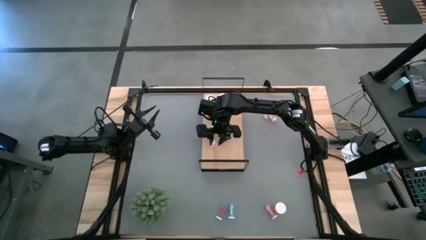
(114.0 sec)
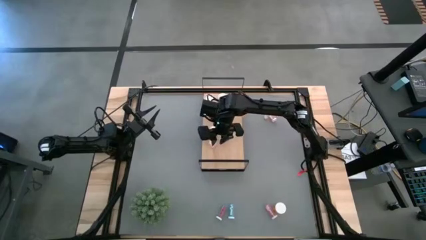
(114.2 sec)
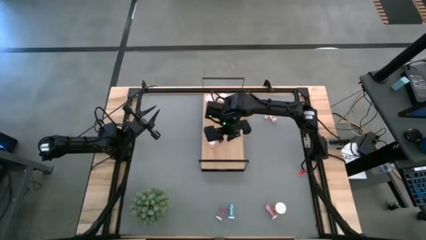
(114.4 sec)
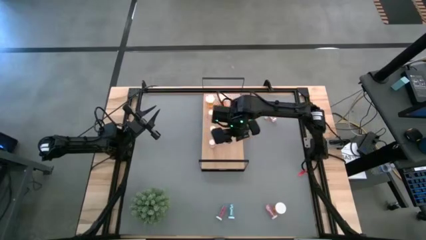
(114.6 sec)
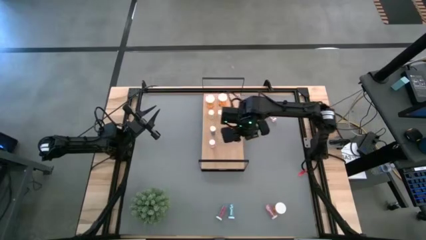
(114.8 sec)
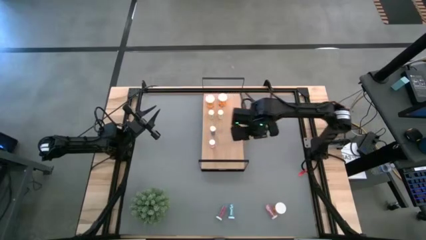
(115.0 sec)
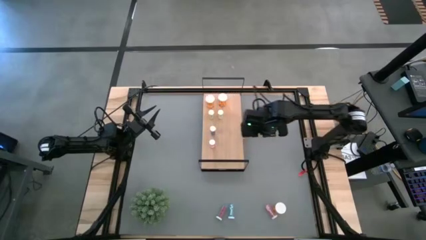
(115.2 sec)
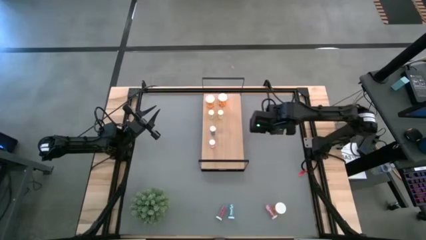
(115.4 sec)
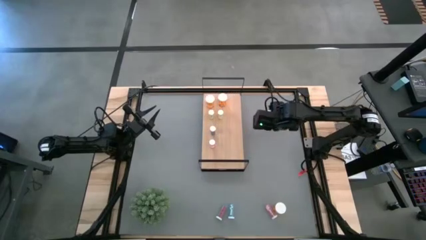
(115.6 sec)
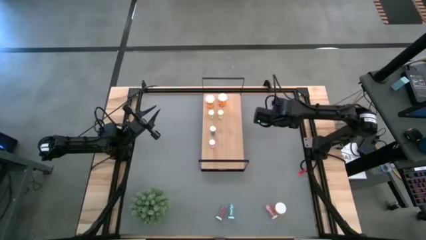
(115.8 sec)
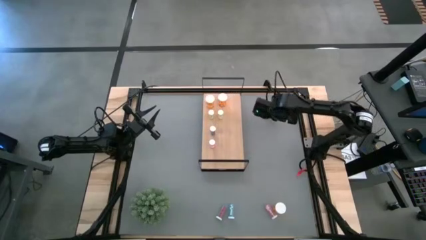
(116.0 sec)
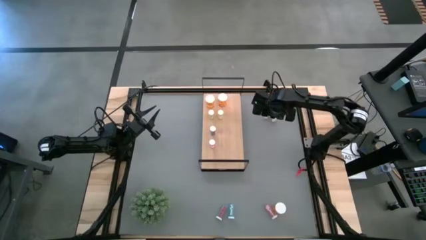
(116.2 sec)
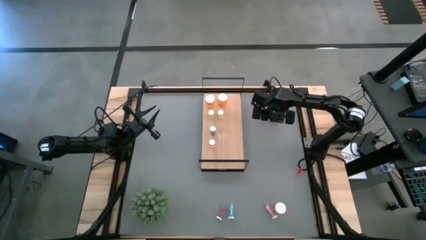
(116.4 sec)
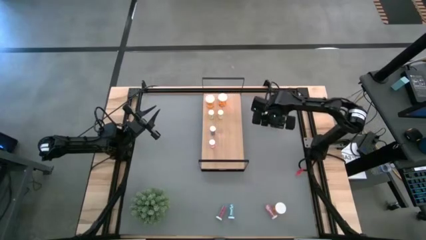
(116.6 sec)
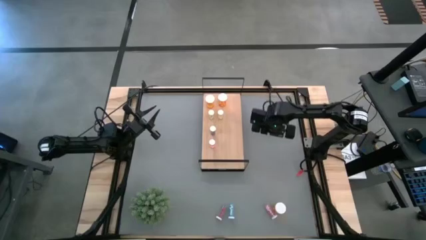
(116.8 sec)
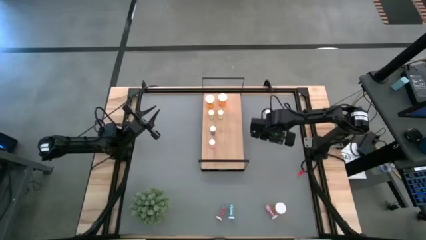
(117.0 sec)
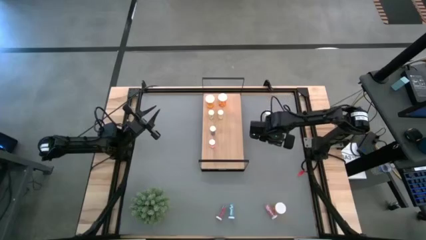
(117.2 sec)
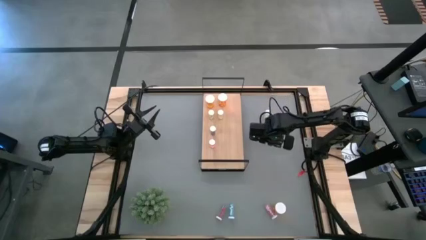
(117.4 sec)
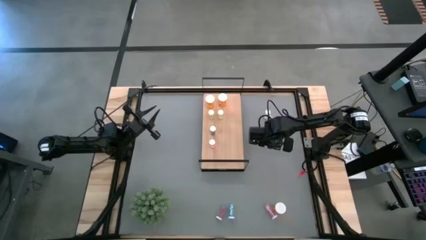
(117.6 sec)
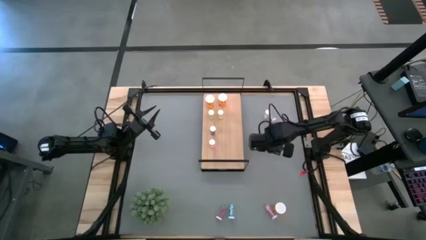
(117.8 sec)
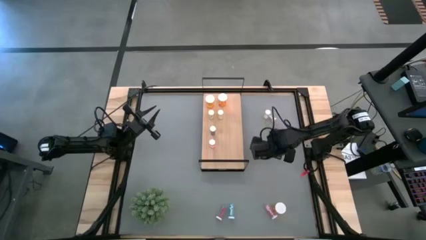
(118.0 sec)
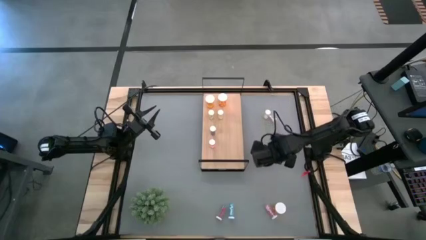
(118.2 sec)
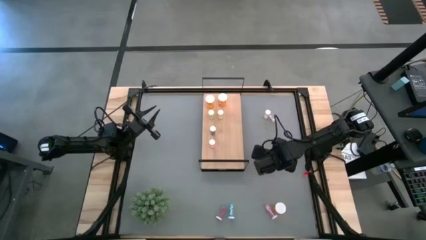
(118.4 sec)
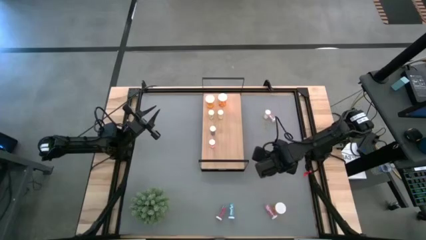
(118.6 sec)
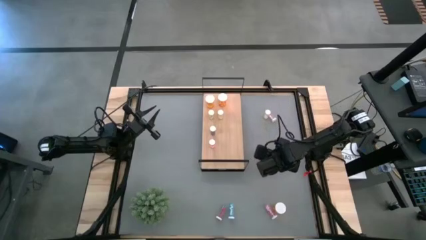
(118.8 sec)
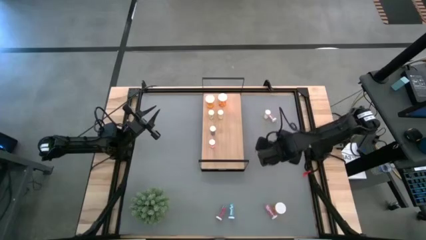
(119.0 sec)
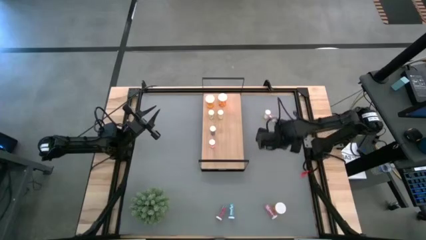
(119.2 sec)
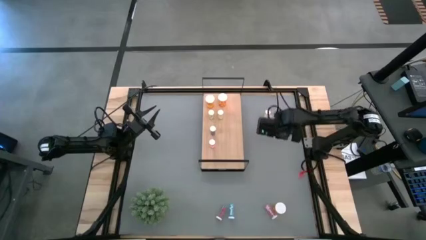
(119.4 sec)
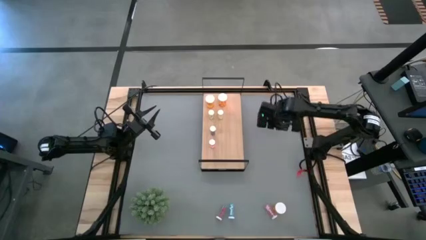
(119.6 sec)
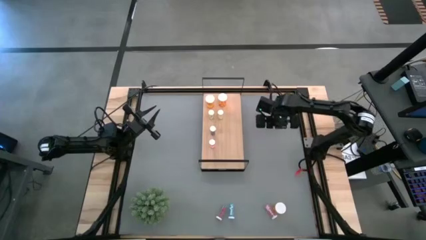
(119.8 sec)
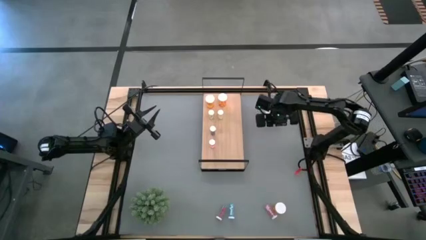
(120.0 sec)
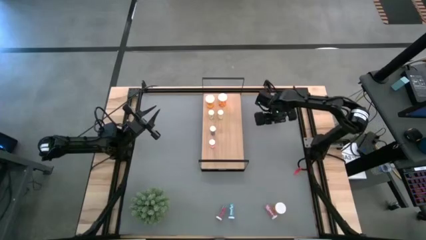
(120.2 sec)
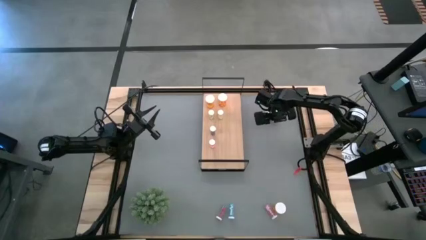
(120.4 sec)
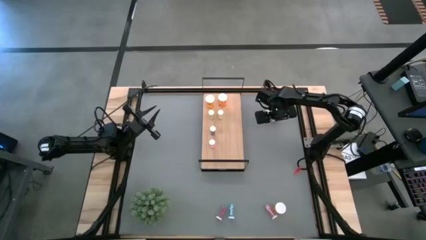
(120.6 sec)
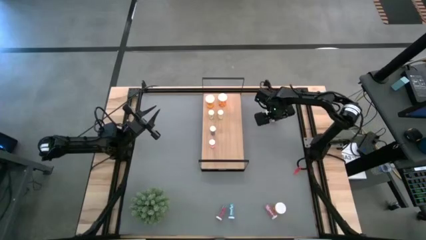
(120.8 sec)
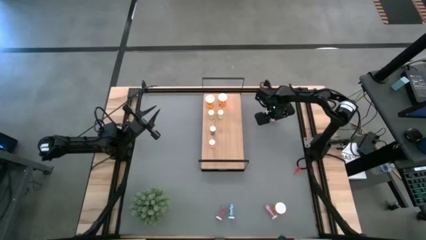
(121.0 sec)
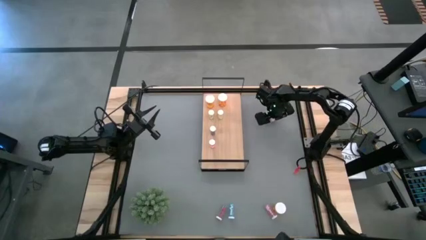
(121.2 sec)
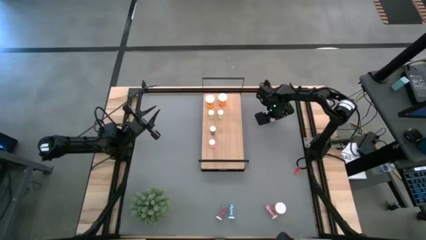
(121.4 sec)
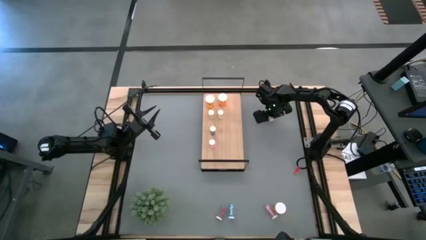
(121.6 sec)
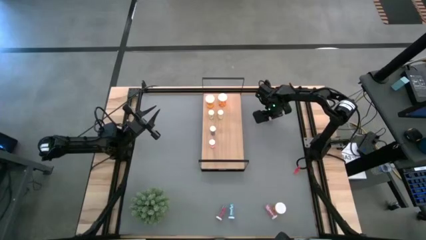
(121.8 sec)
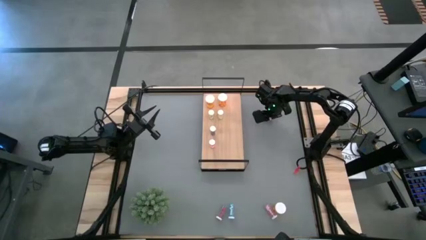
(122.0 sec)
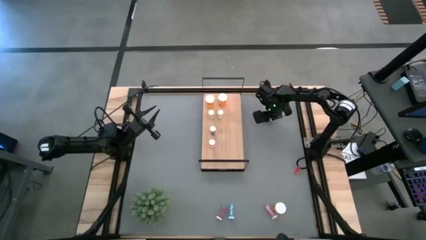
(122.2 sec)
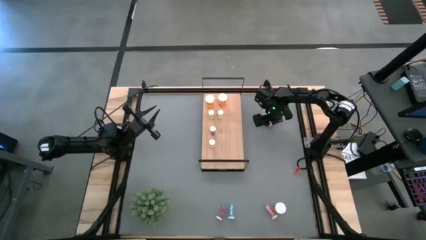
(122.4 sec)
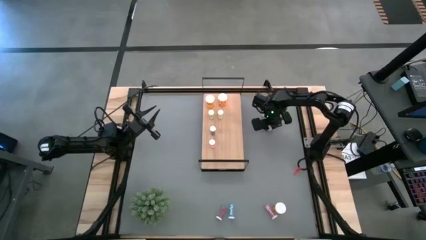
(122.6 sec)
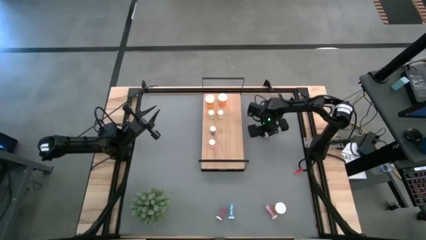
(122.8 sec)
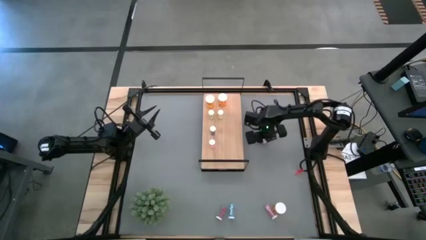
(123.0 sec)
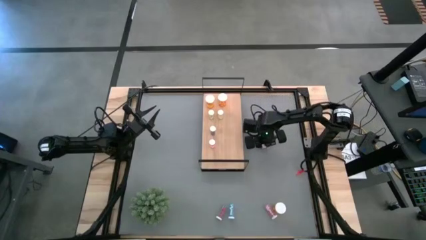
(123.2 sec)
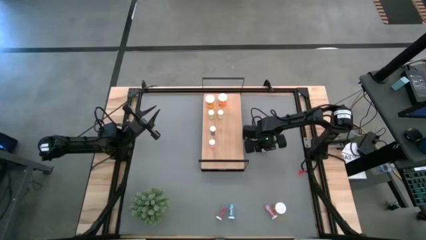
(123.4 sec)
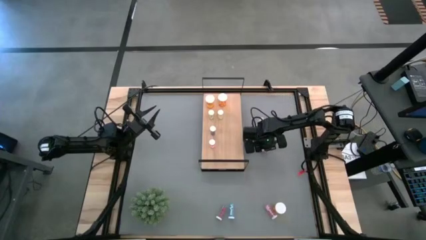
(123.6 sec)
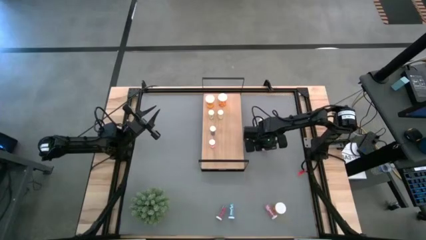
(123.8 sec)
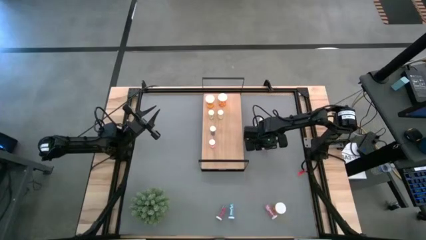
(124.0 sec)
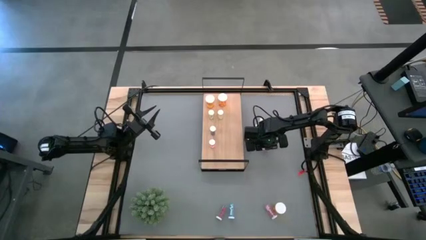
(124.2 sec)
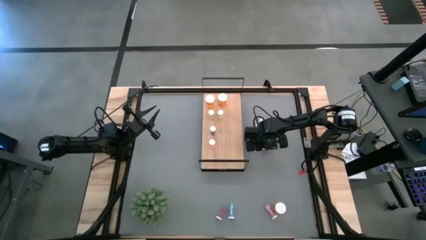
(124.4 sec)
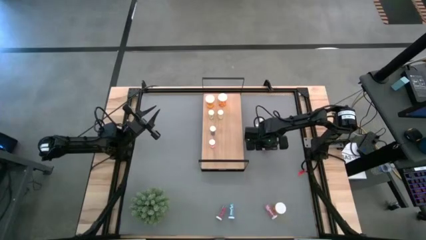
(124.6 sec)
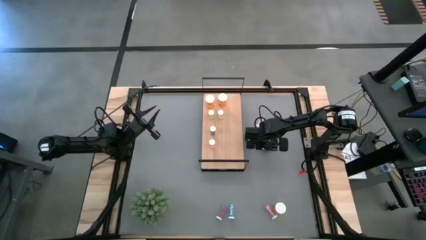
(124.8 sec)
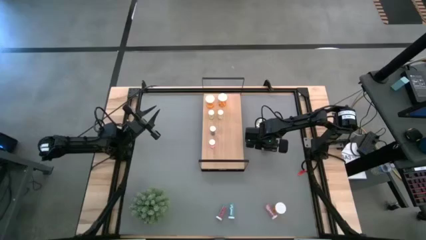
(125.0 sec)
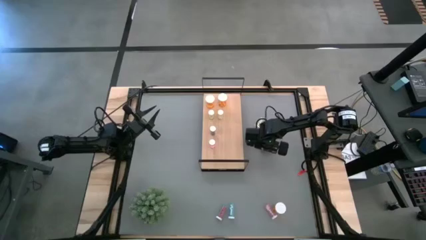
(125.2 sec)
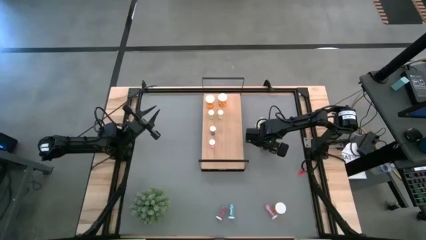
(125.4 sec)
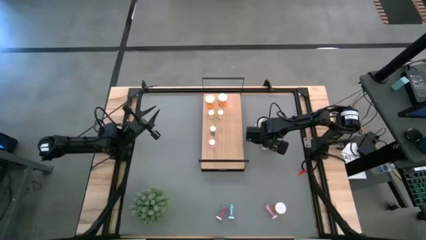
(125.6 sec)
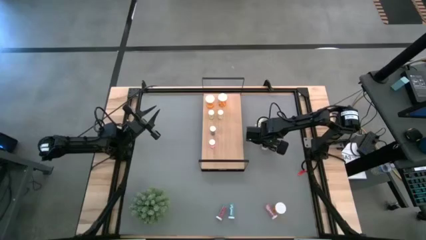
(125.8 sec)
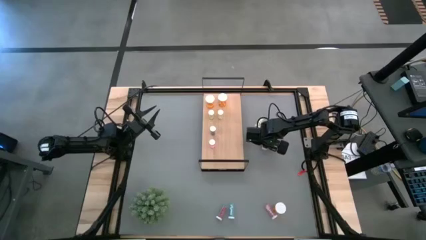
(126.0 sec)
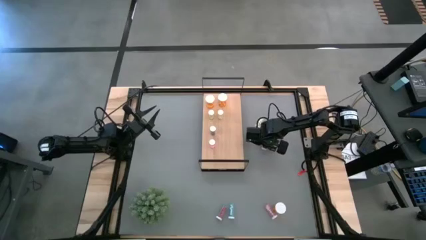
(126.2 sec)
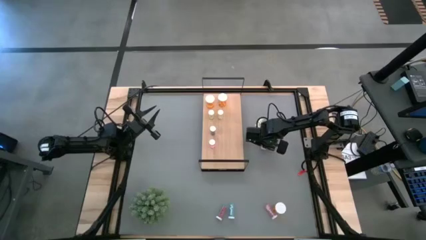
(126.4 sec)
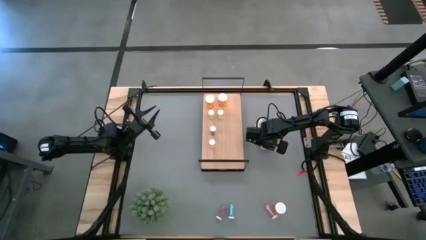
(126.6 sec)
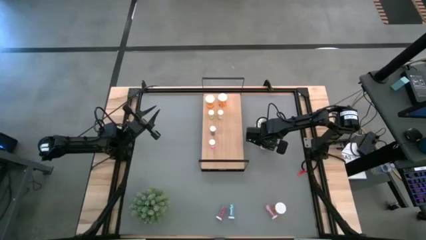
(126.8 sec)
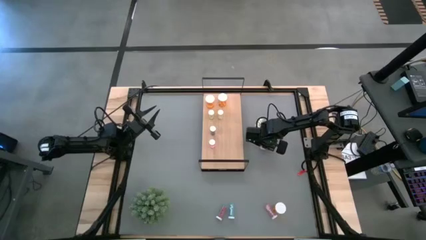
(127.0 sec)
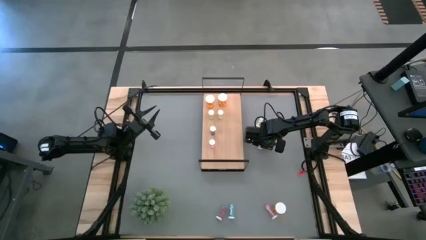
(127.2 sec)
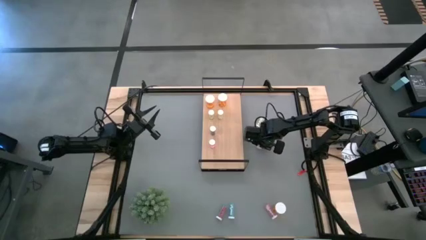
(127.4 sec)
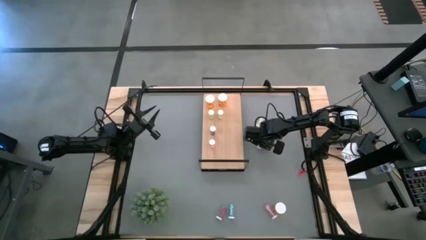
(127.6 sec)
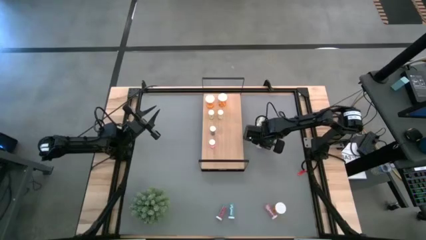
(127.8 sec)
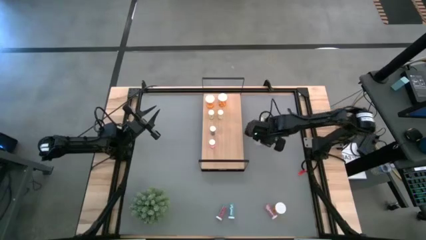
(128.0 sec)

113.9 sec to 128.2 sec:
Task: Pick and place medicine bottles onto shelf by color
Put the top pink pill bottle on the shelf aligned with the other pink bottle
